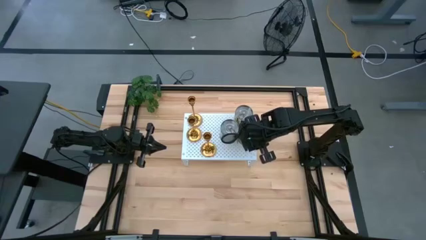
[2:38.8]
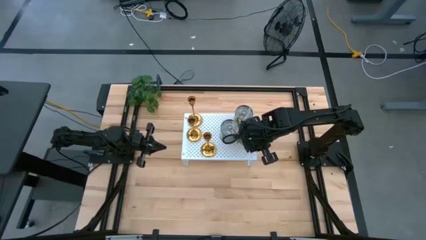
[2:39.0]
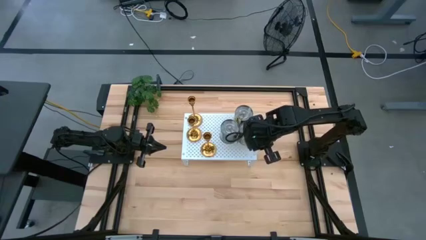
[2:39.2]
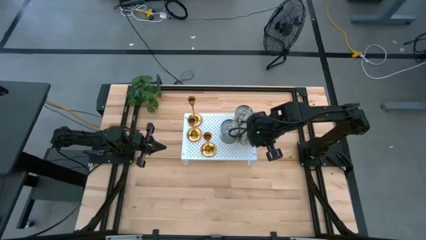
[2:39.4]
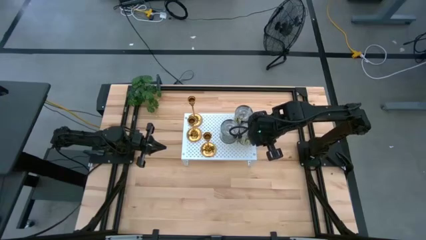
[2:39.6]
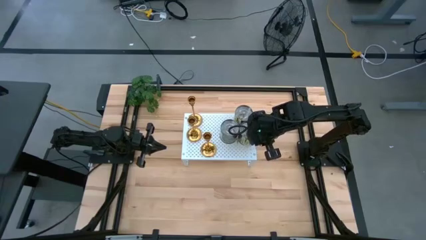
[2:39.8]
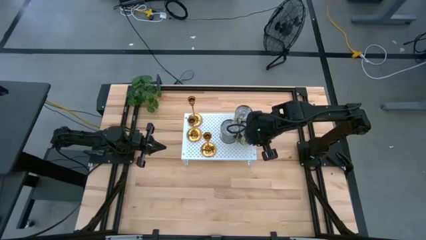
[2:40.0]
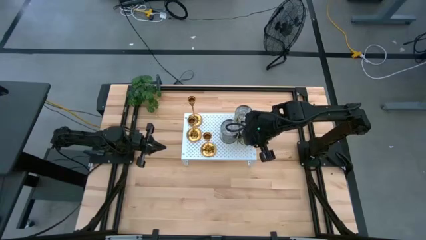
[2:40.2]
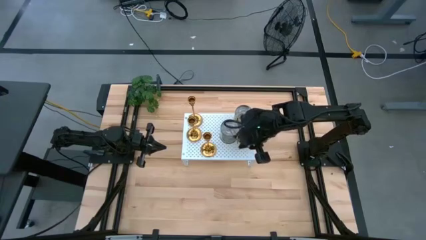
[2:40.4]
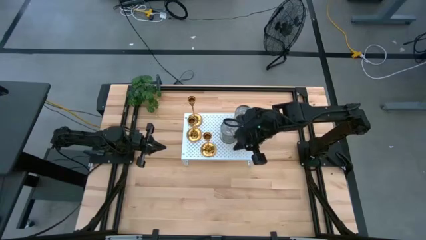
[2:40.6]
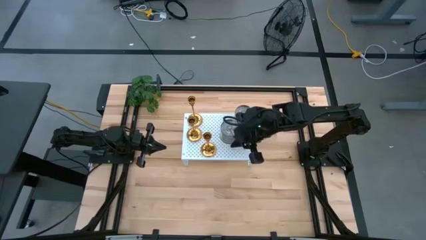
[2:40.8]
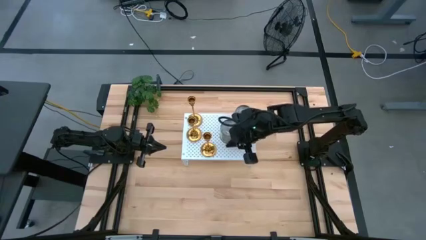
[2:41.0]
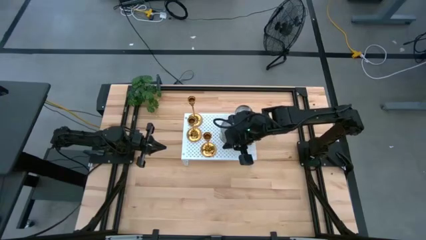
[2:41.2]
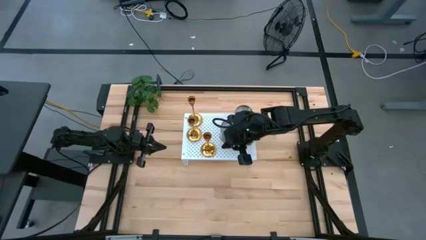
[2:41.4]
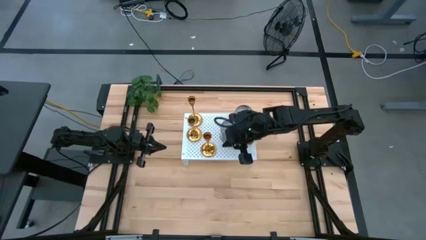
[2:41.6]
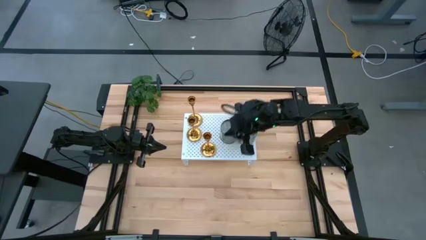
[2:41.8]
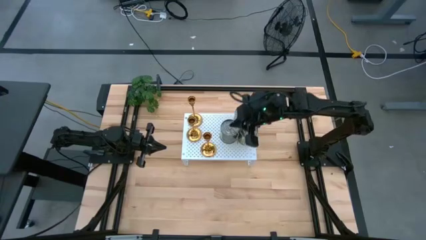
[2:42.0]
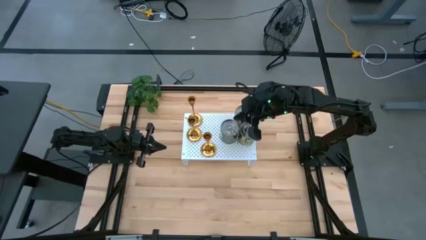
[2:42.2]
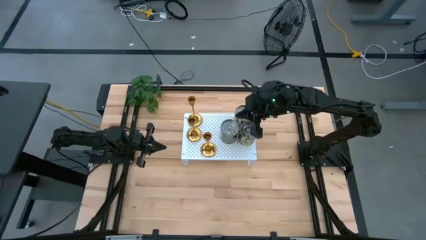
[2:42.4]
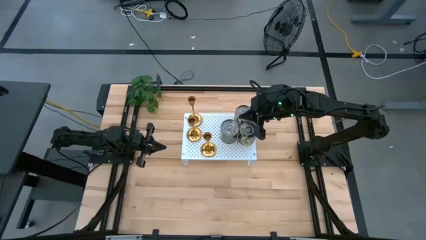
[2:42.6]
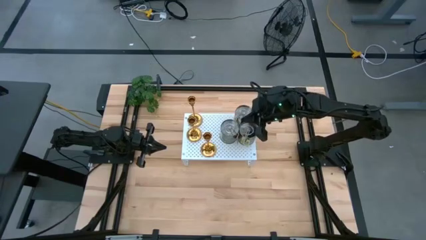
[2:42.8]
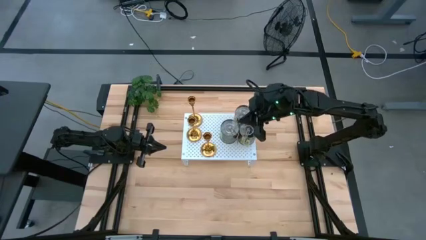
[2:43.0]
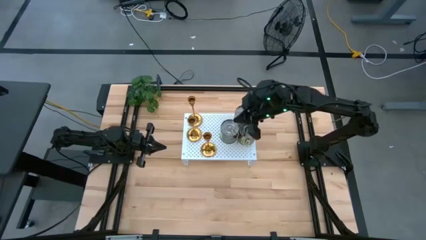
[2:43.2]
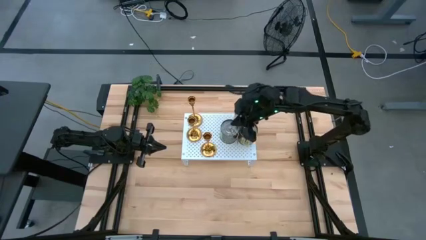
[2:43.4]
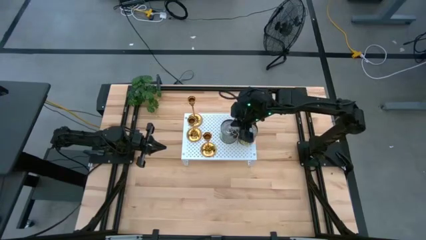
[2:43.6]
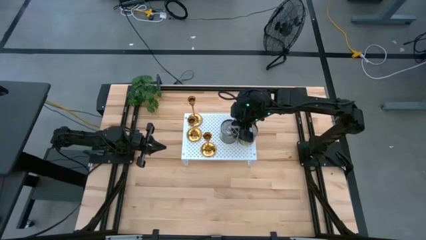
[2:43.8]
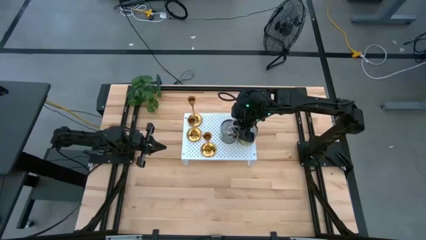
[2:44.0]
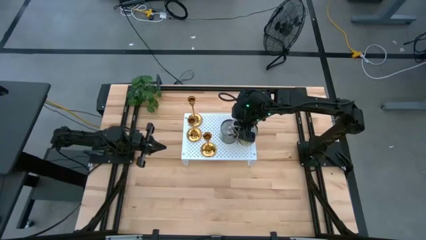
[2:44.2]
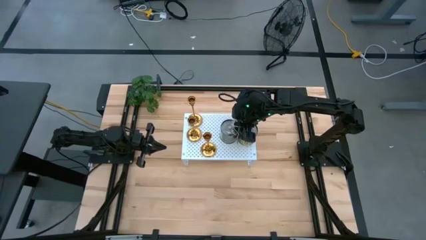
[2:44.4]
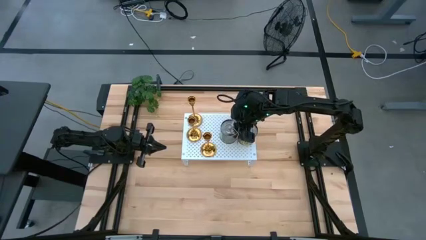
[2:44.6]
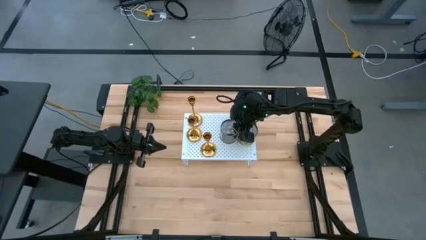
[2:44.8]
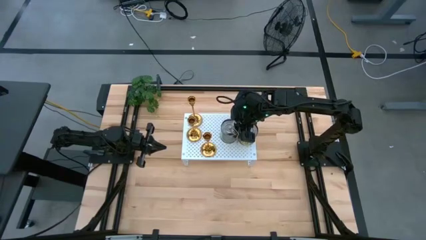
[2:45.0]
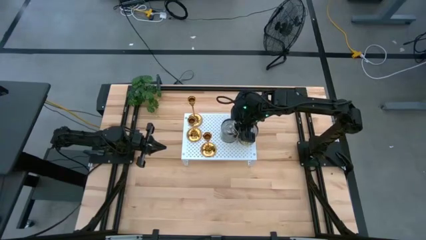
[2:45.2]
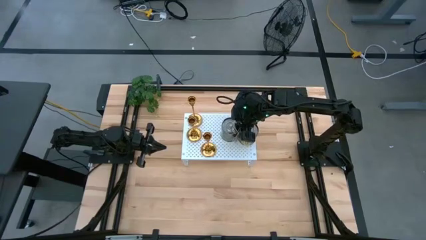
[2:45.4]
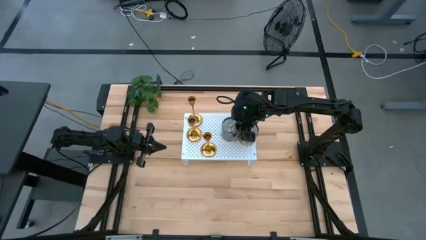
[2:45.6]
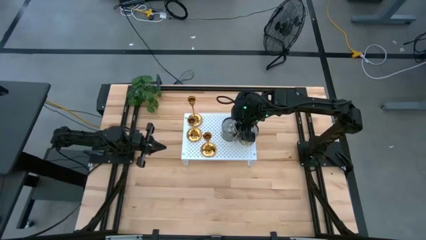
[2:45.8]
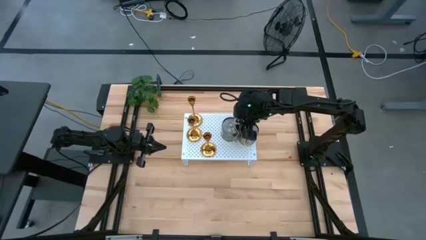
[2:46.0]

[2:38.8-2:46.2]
Task: Pick & Place candle stick holders
Adjust the left metal lid scented candle on the shelf

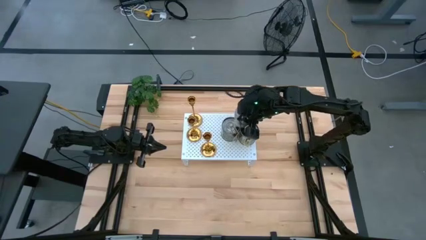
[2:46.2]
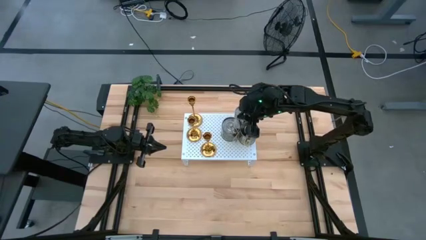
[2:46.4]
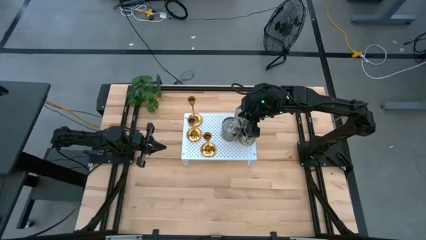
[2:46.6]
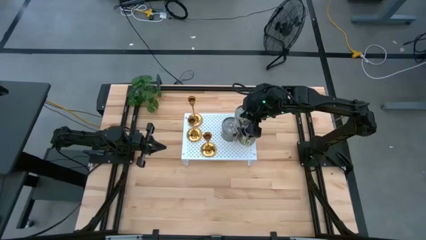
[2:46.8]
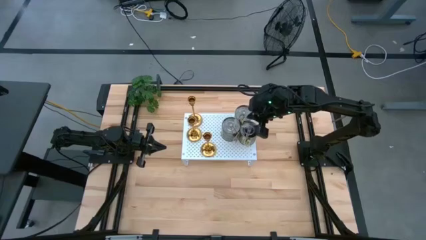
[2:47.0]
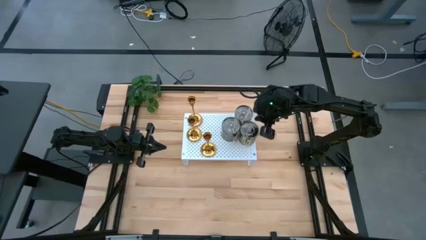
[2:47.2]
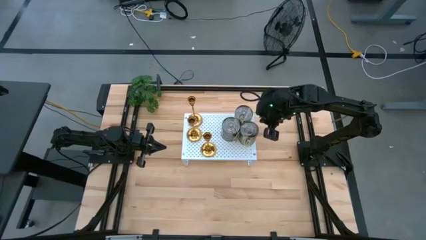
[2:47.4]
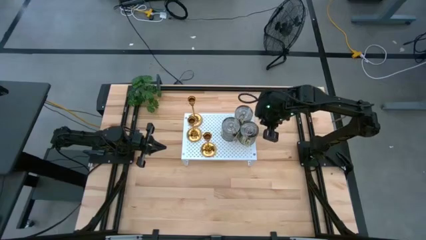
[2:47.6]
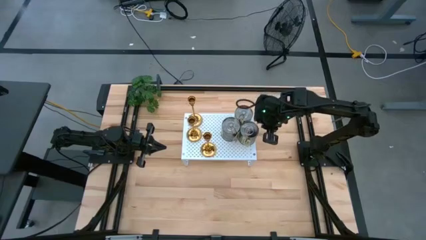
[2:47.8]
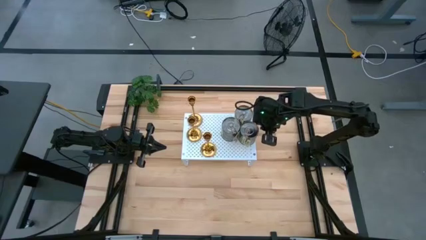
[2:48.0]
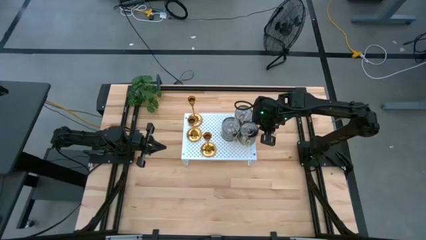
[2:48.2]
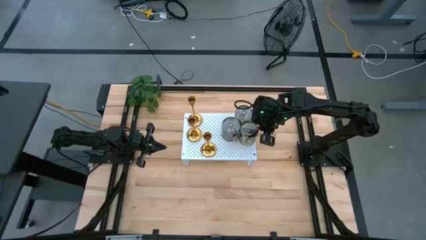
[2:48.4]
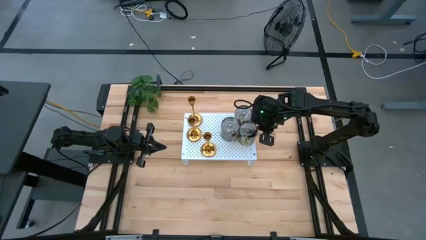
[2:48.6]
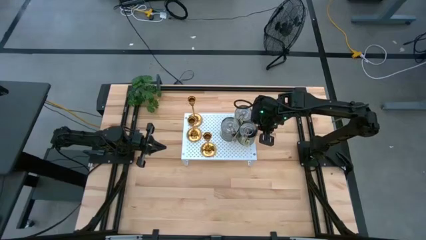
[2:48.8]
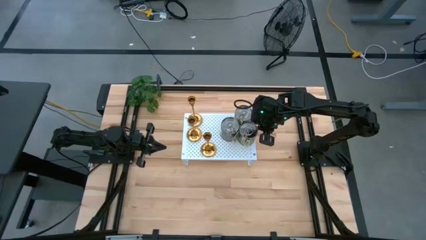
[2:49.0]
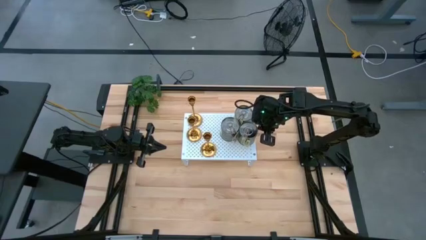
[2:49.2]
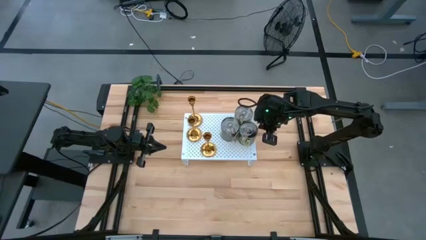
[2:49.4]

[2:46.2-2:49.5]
Adjust the bottom right metal lid scented candle on the shelf

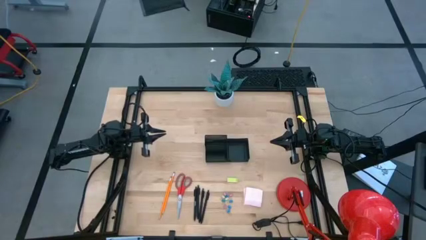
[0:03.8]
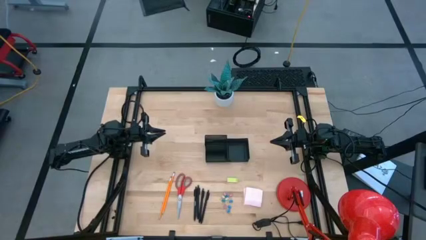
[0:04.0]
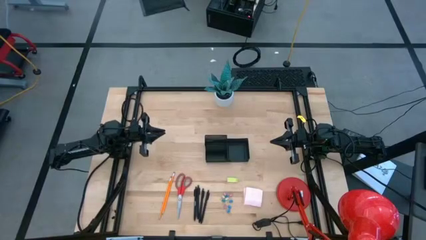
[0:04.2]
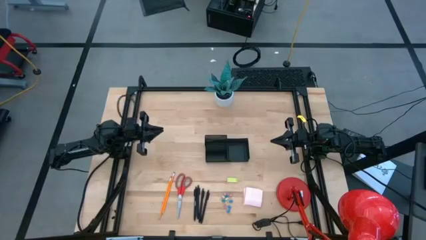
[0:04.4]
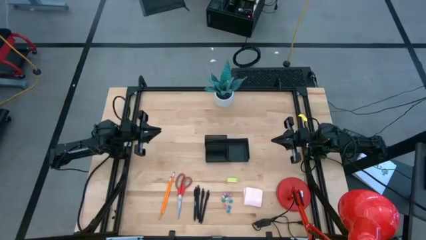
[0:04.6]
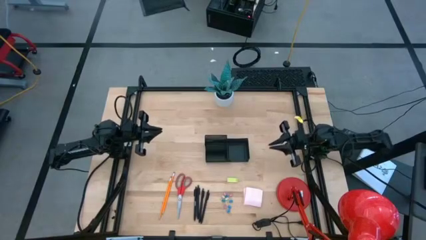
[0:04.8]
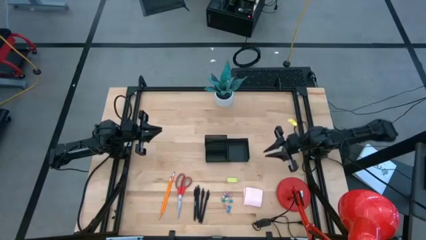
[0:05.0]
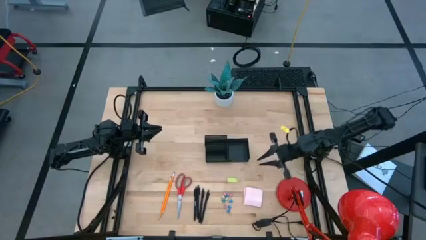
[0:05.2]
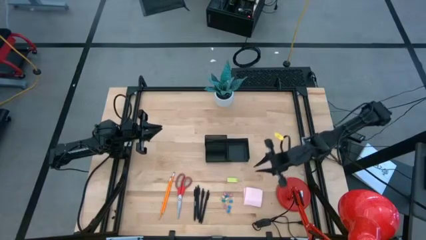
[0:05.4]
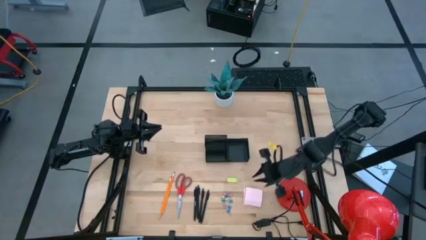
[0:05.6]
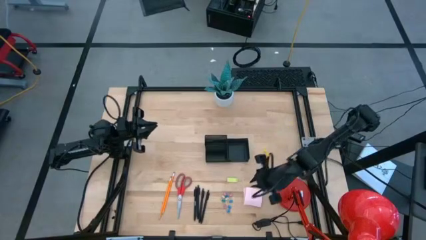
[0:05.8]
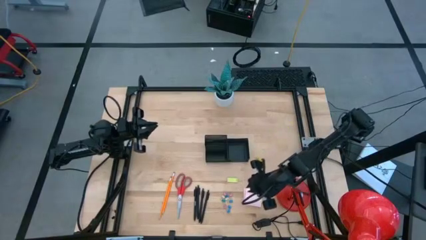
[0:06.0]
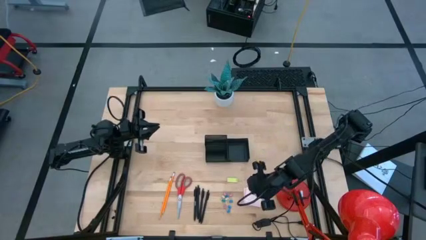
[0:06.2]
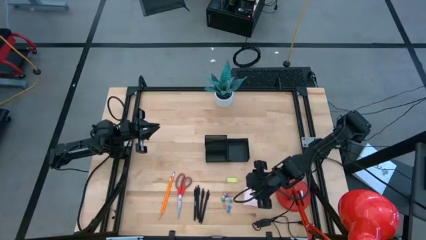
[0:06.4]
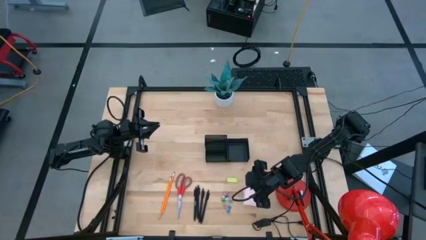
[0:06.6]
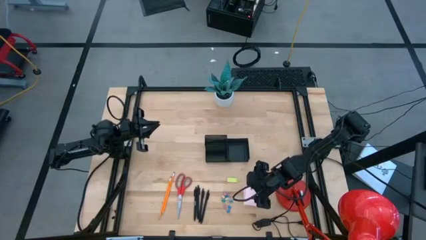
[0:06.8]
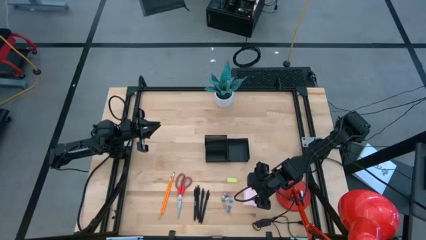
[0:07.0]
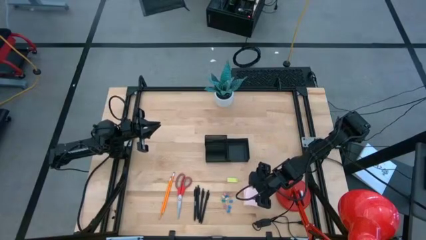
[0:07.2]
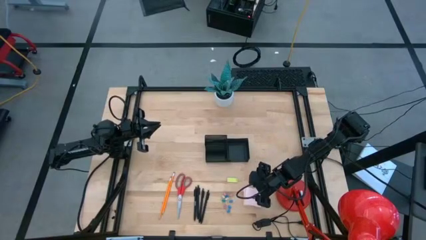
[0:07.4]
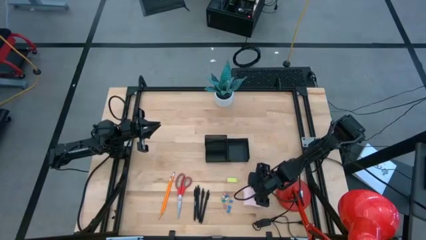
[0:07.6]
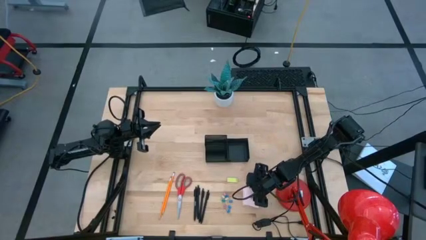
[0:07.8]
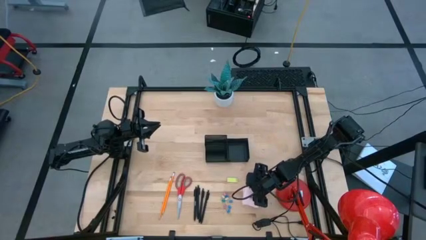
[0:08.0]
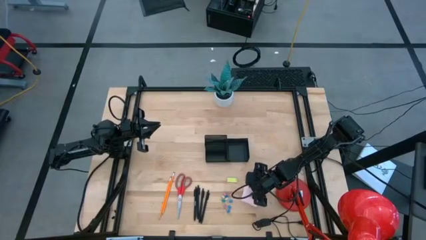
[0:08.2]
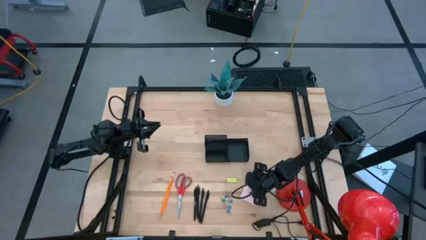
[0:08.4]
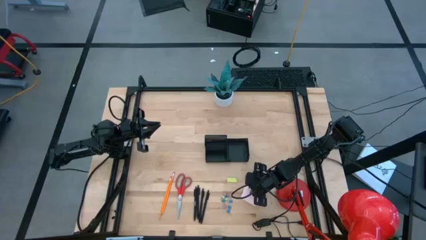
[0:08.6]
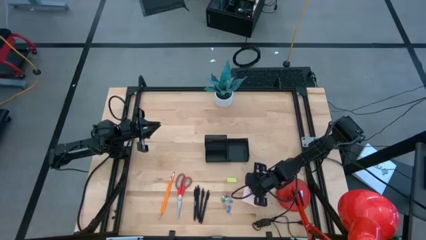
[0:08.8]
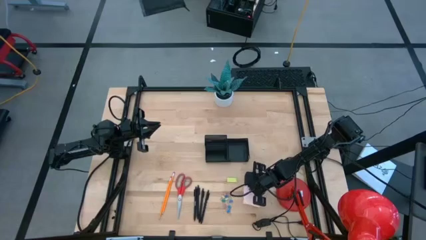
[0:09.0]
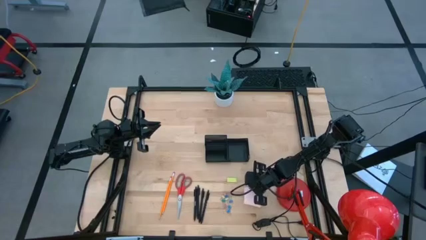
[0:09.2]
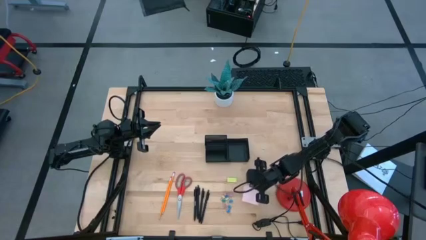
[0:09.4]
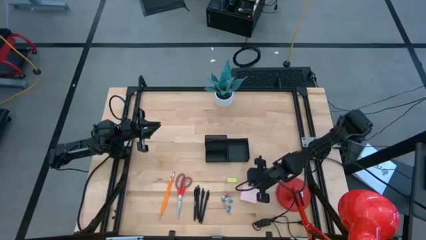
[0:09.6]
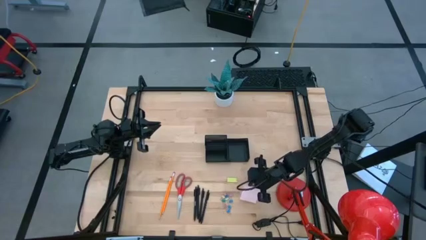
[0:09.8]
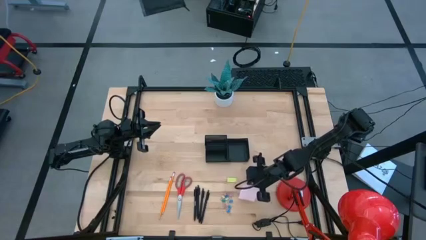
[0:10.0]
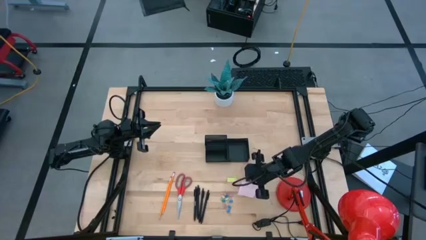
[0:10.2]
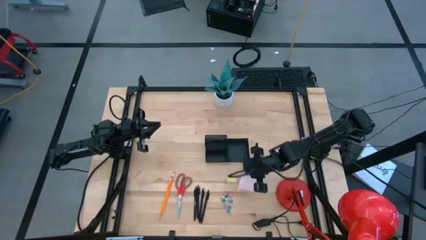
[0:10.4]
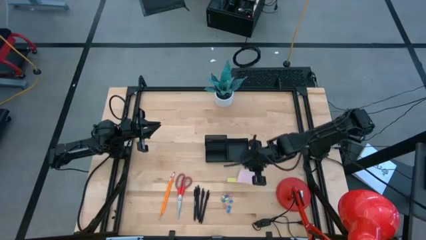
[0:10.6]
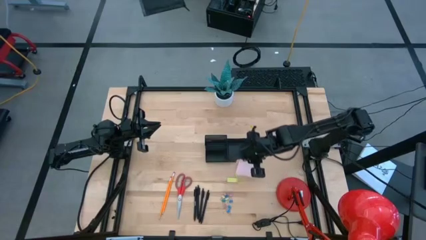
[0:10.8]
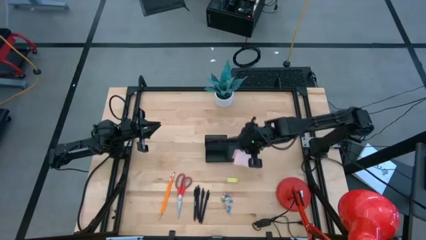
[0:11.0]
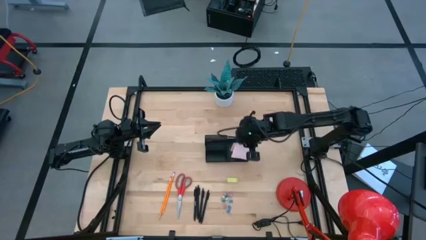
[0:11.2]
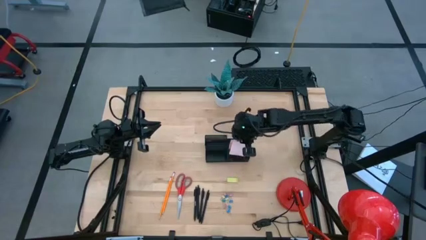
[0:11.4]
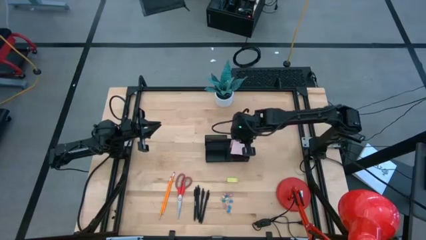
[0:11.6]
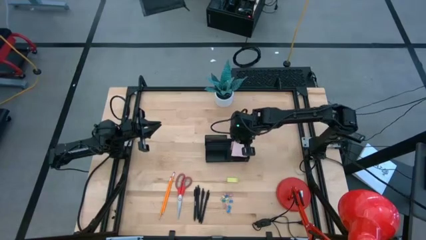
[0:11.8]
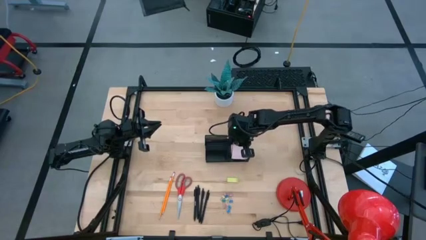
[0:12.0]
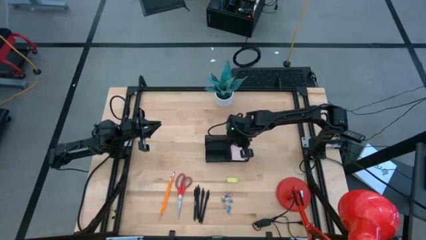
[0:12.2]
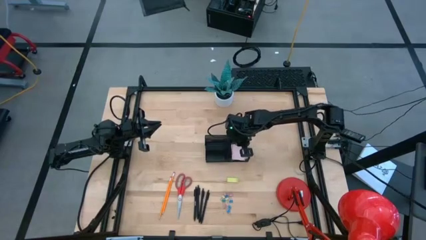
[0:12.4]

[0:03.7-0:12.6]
Task: Pick and place office supplies into organizer
Put the pink sticky note pad into the black desk organizer
